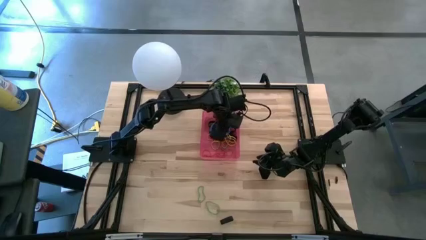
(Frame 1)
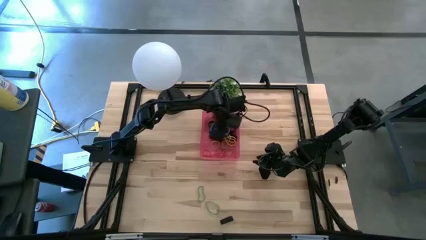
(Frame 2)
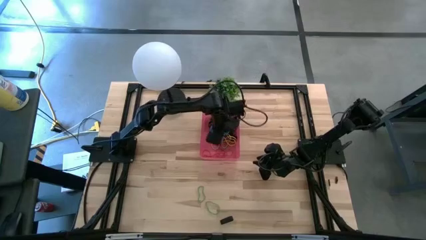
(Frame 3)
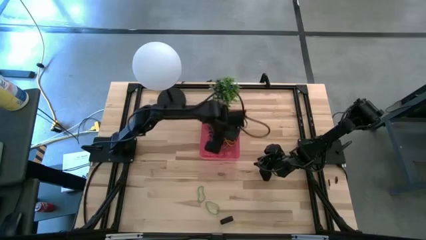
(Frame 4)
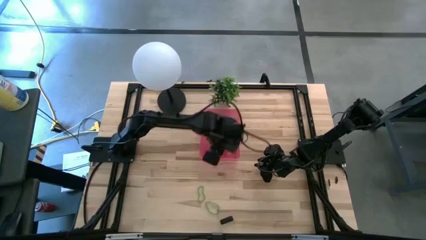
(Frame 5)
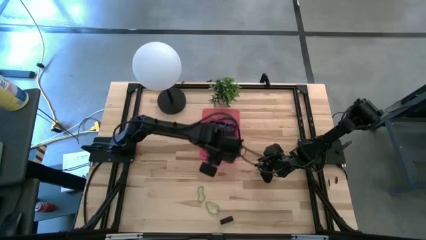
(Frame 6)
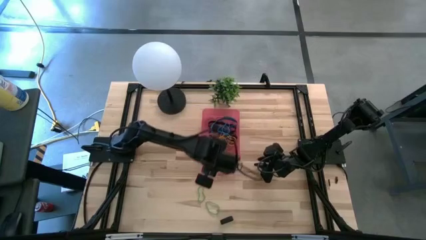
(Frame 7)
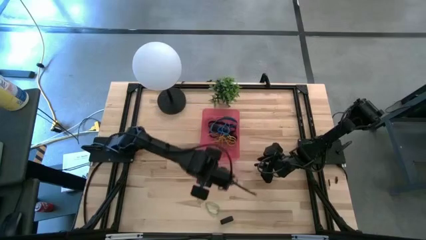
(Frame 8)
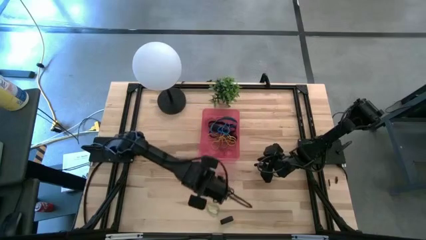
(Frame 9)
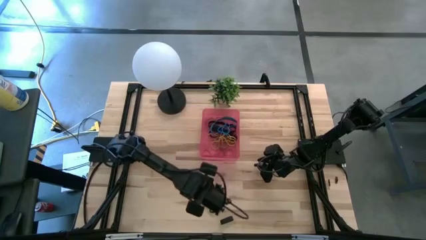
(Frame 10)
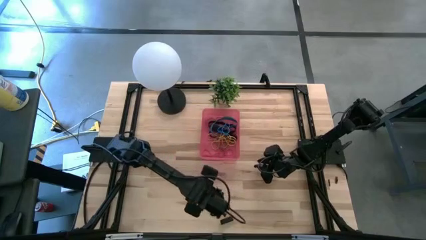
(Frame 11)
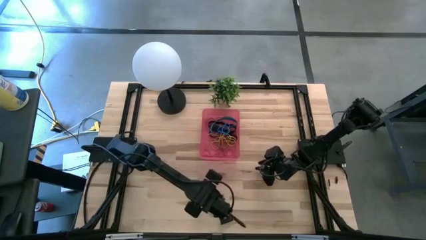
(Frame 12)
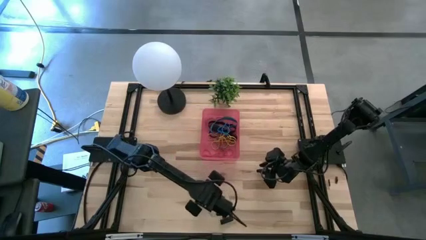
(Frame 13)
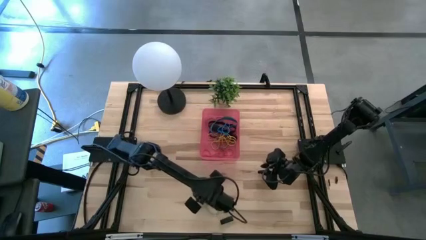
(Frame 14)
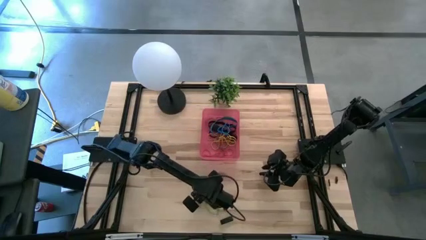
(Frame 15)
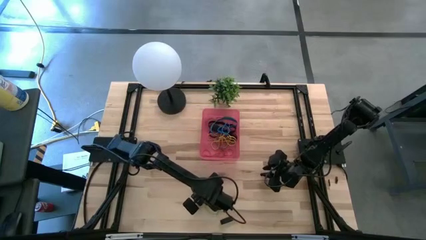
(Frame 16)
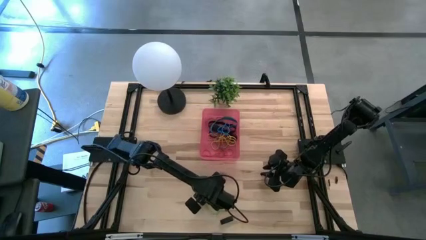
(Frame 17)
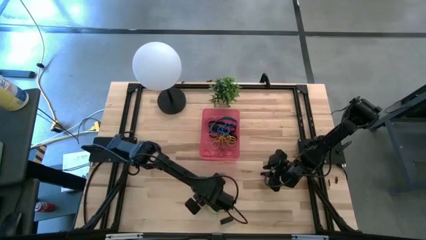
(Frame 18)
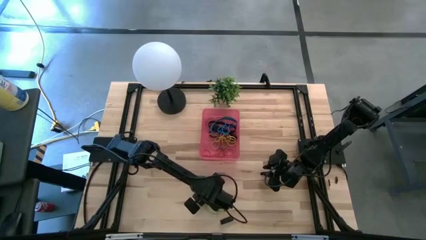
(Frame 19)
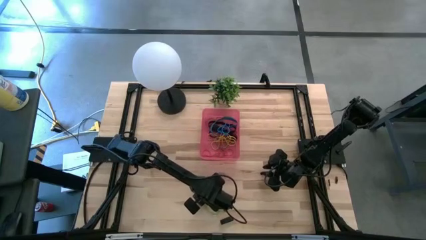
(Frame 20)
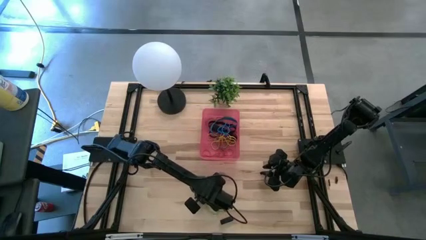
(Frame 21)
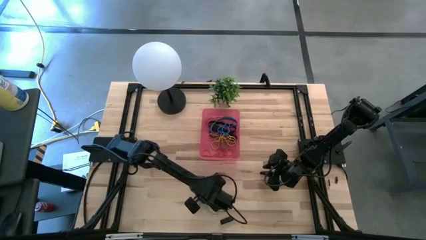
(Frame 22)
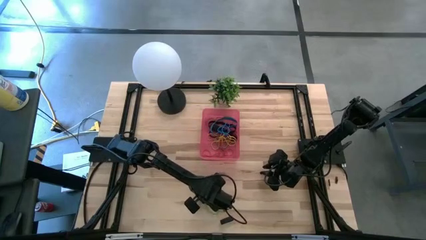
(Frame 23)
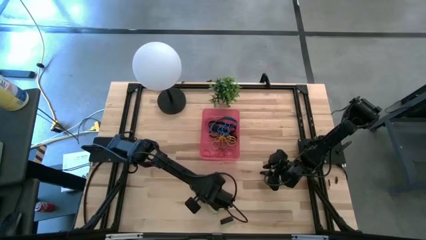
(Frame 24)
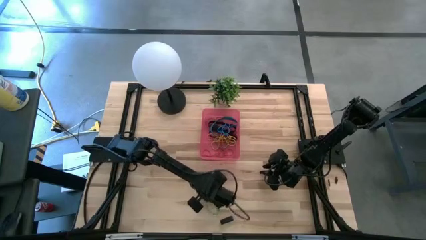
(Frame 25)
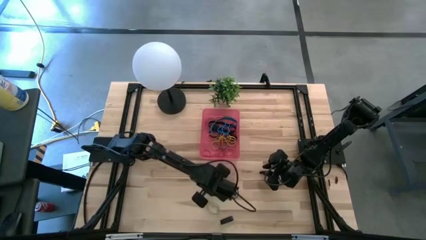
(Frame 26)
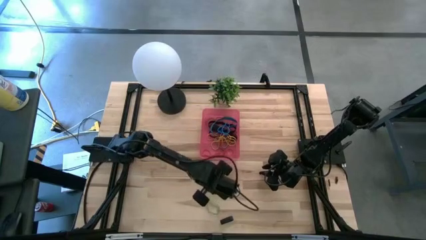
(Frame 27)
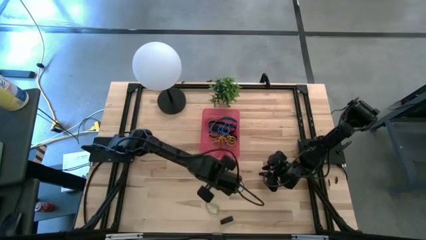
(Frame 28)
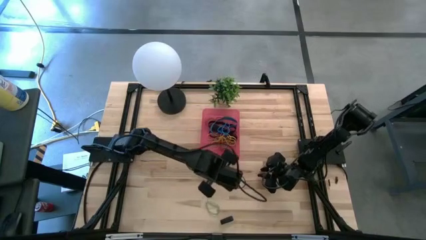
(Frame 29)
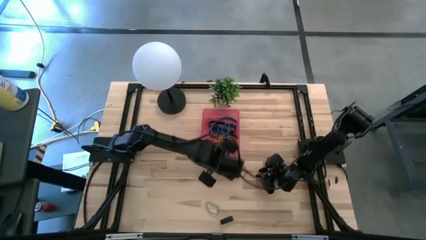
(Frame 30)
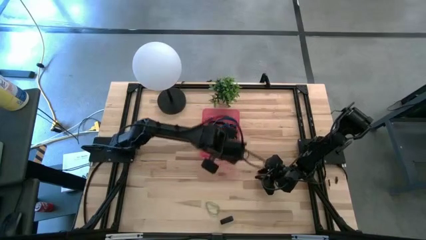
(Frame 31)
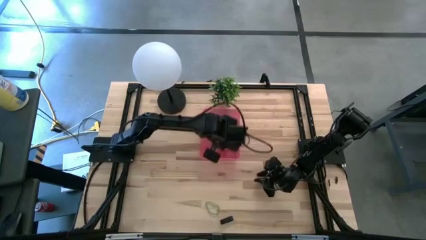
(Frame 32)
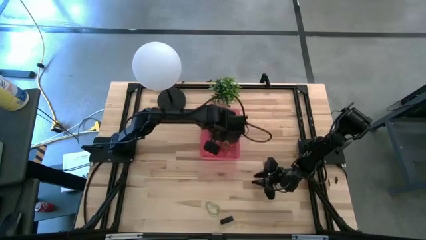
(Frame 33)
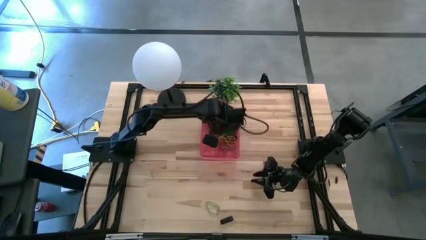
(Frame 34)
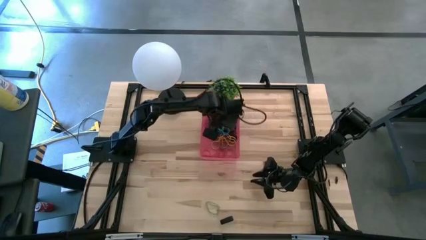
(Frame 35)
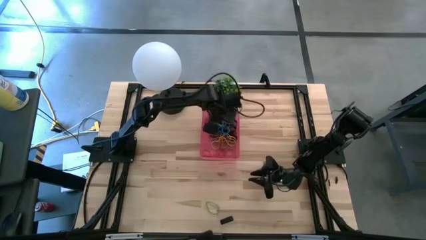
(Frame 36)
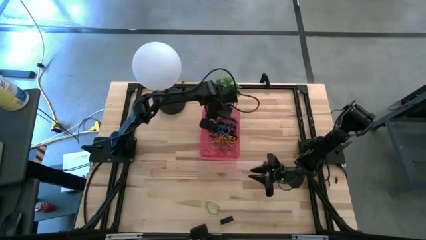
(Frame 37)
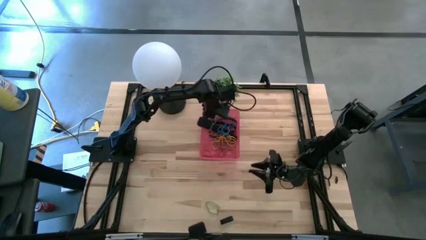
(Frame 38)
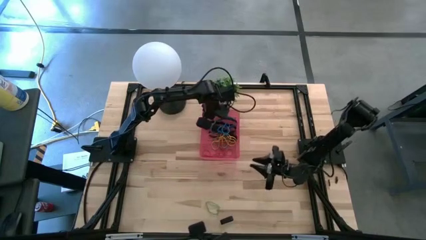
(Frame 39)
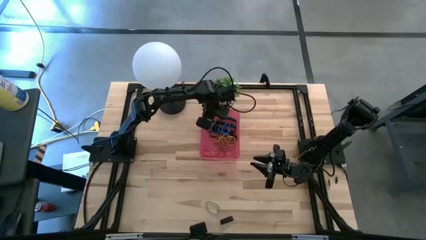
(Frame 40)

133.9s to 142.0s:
Task: Pick and place rubber bands into bin
Put the green rubber band into the red bin

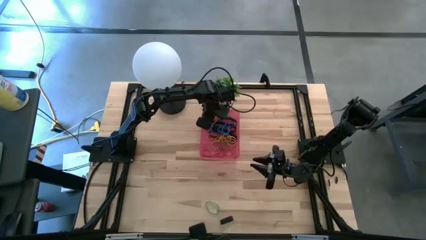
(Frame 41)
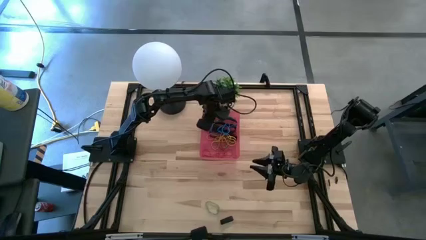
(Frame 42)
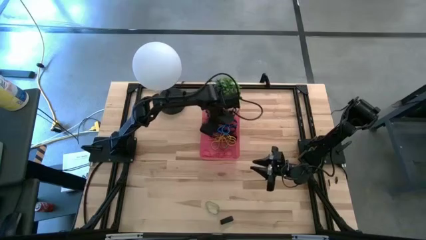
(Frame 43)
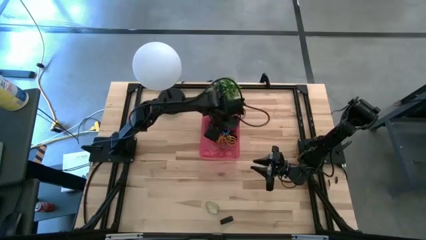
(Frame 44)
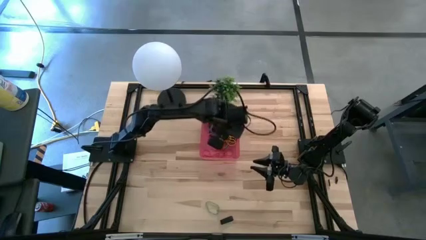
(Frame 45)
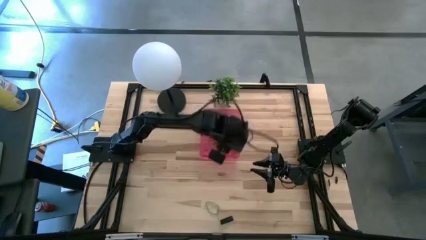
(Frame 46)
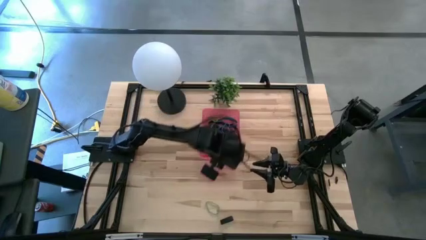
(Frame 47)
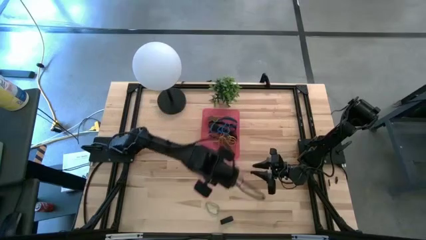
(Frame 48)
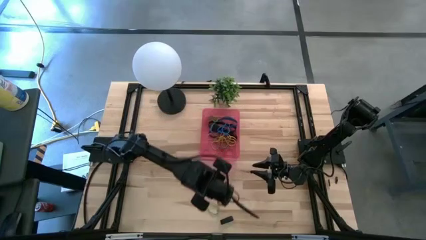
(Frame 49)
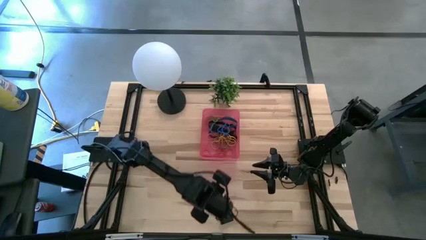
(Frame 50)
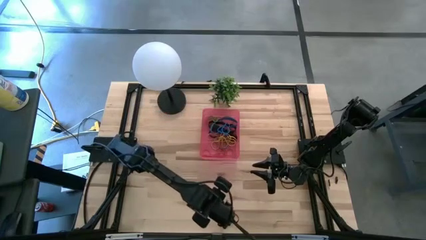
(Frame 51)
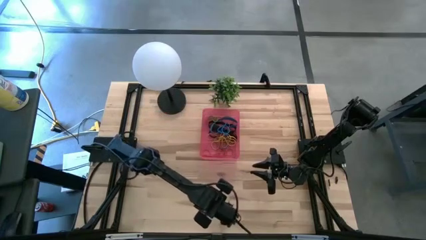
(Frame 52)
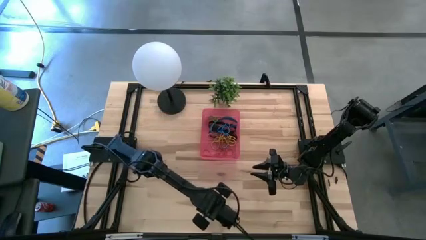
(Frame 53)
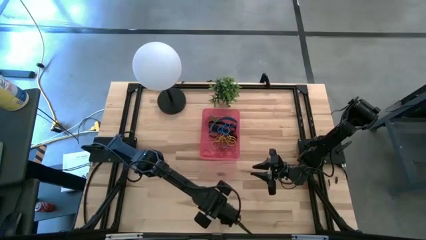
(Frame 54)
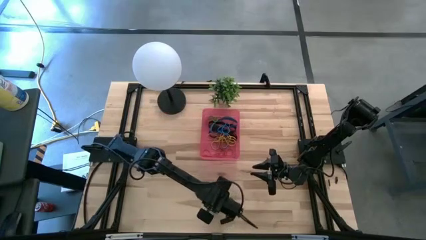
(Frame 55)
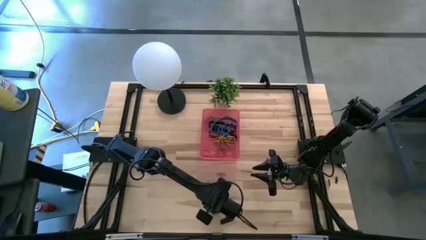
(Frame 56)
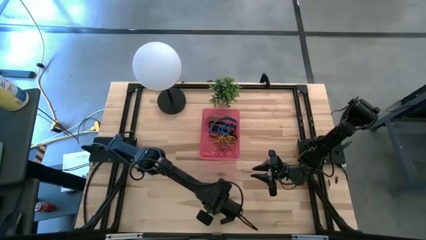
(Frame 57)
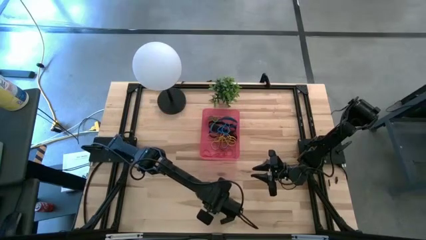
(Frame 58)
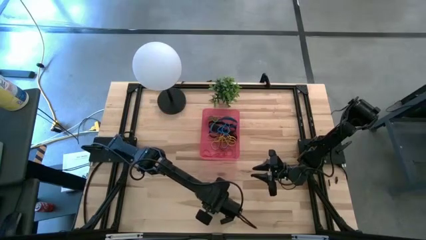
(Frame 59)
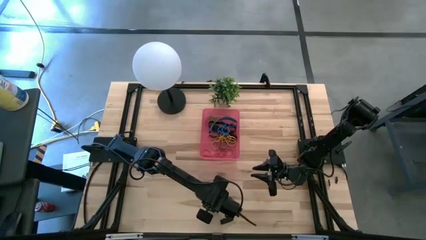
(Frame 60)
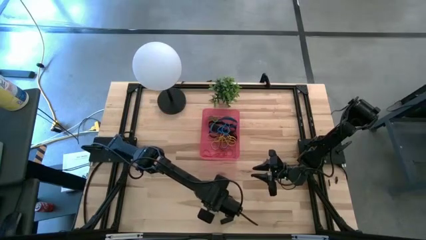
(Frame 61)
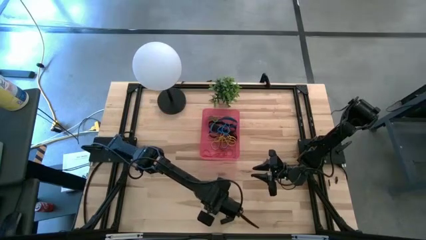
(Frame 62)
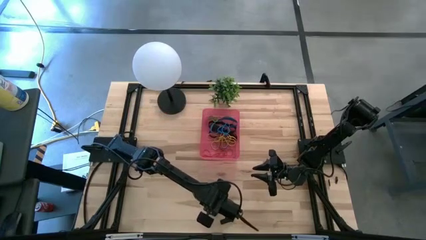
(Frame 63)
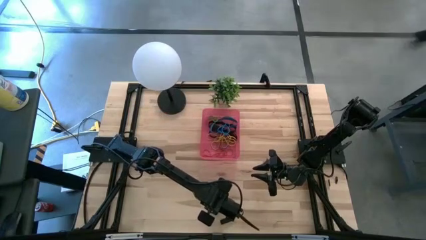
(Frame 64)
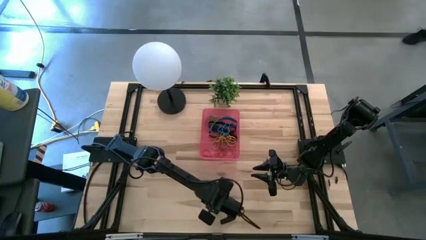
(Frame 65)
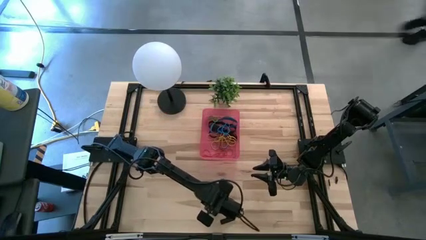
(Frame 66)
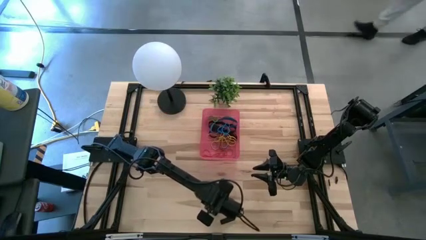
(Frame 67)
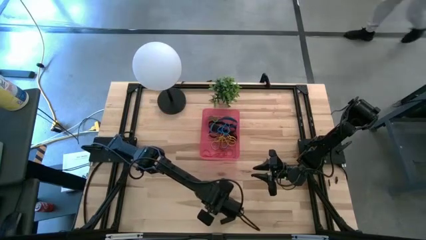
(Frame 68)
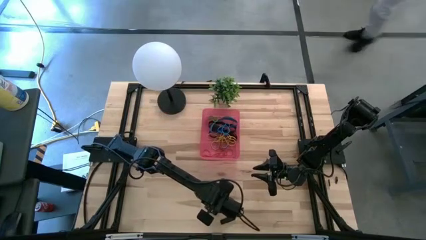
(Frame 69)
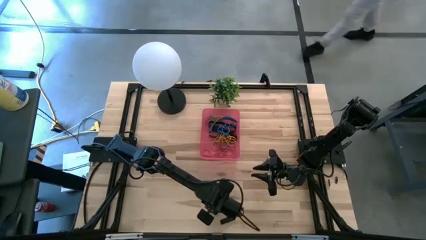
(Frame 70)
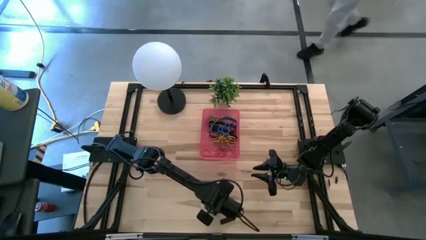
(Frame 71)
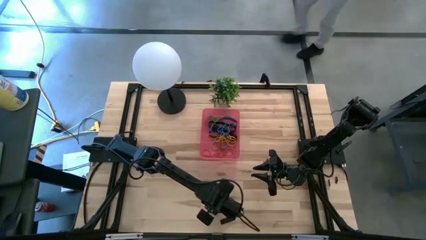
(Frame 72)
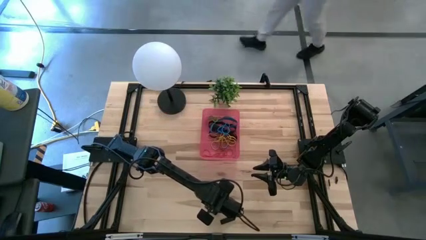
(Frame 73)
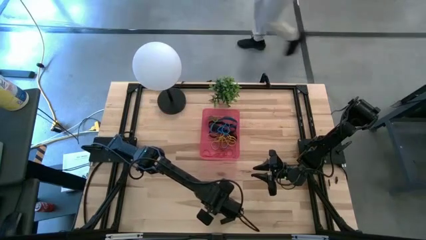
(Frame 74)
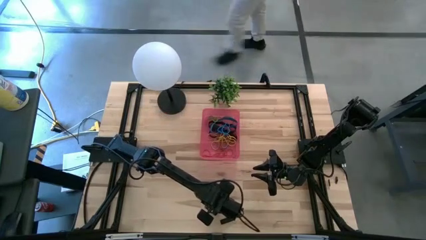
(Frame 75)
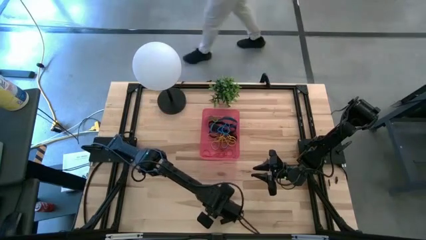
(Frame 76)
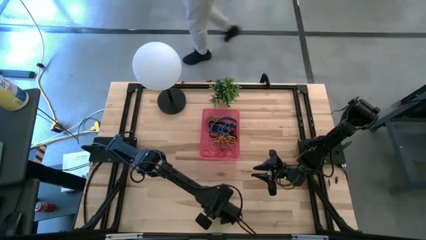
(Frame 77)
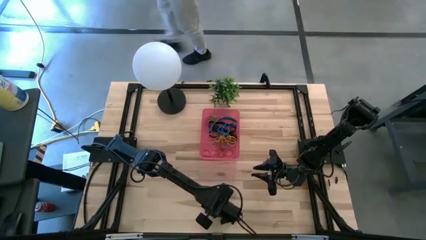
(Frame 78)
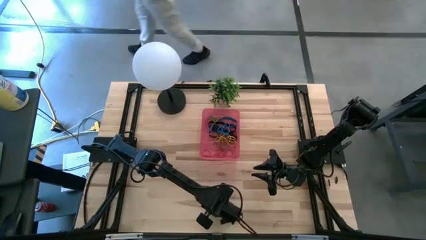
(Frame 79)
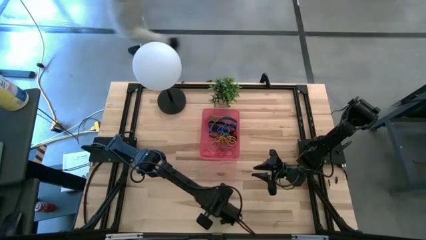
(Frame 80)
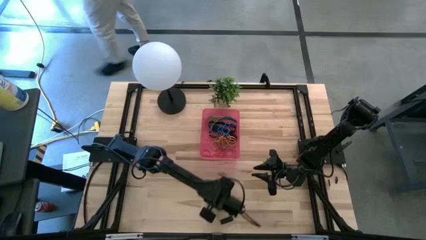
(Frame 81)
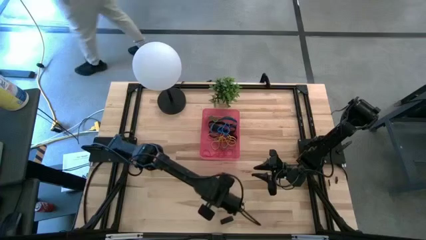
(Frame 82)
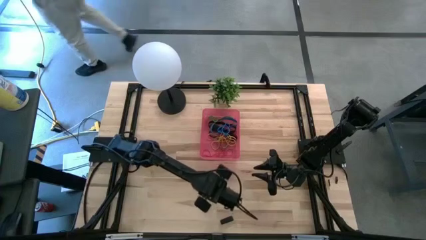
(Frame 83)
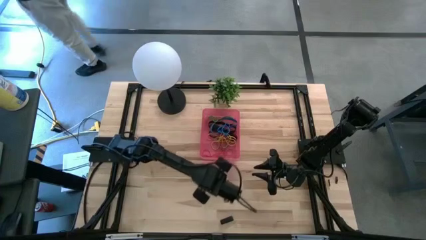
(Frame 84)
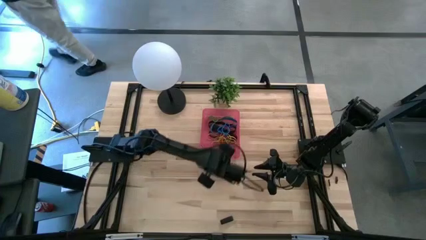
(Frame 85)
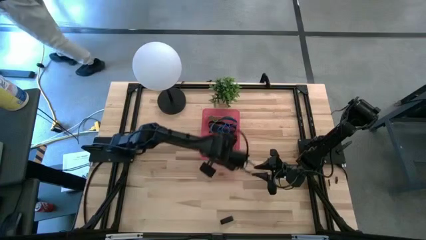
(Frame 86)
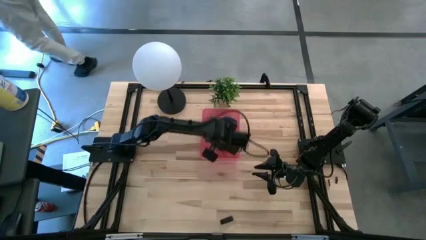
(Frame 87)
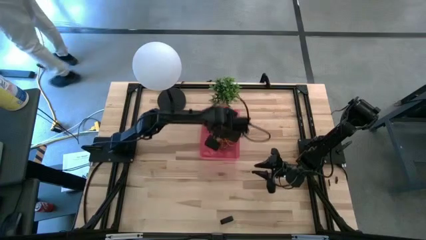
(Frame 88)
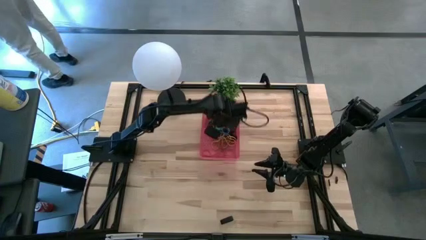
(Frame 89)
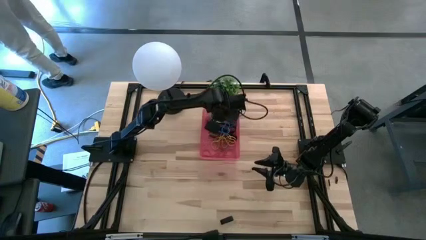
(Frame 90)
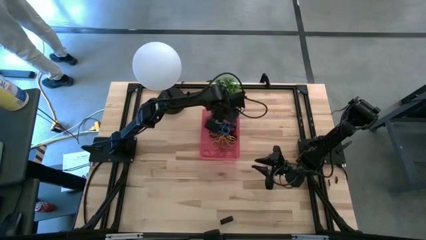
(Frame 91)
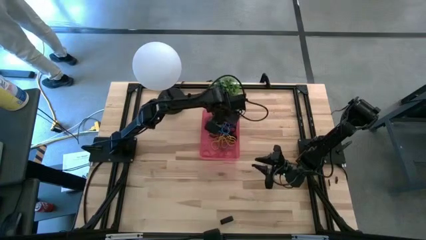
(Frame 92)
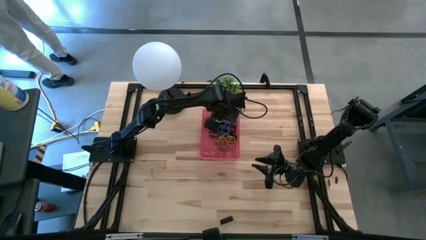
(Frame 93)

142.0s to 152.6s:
Put the green rubber band into the red bin
